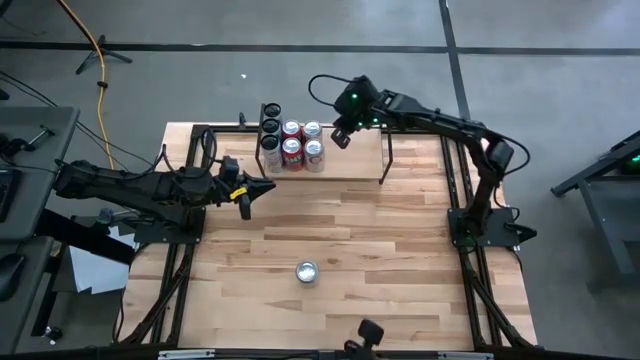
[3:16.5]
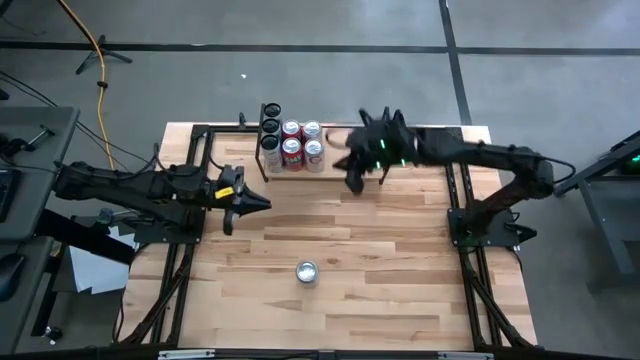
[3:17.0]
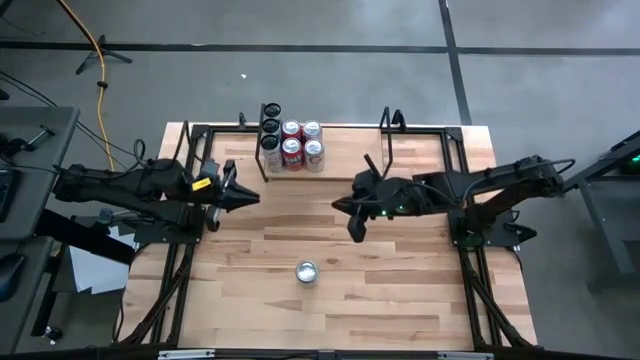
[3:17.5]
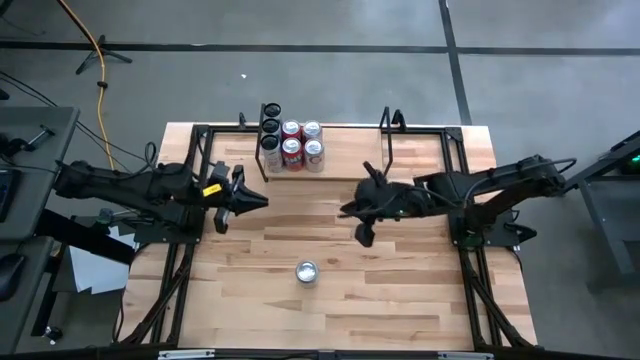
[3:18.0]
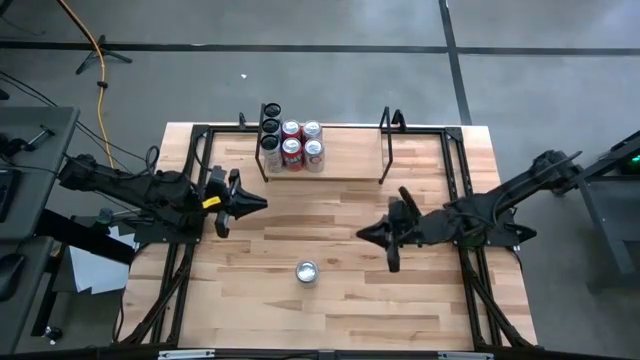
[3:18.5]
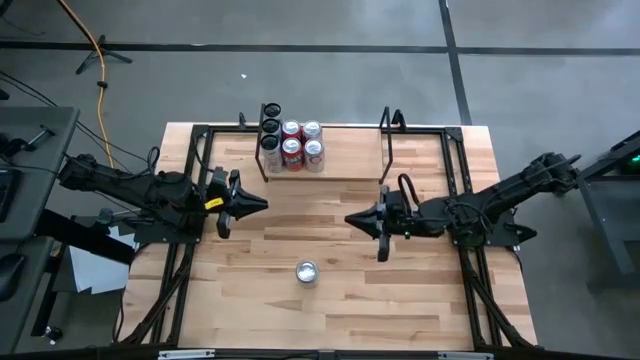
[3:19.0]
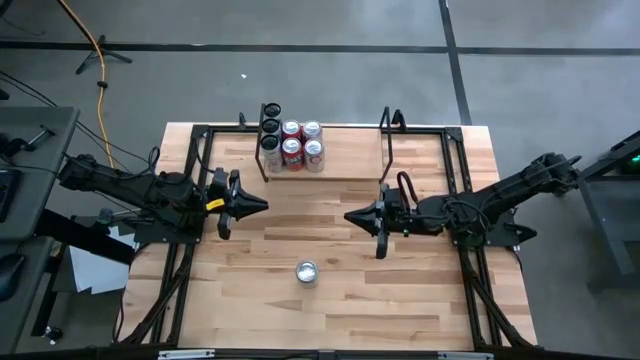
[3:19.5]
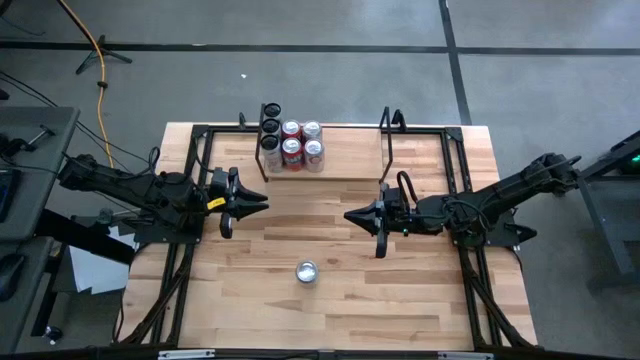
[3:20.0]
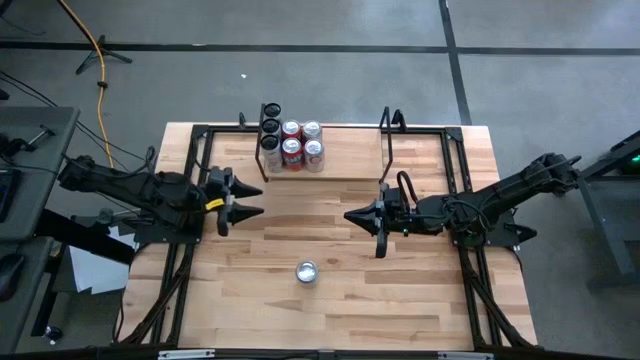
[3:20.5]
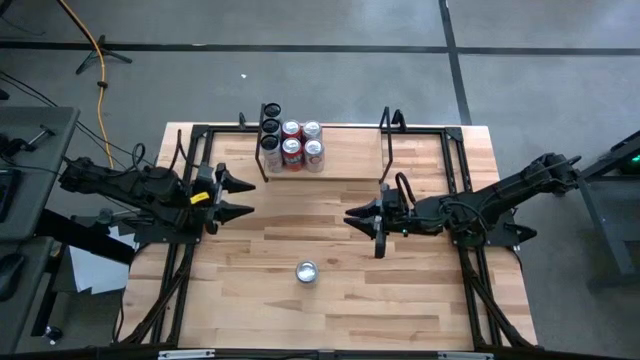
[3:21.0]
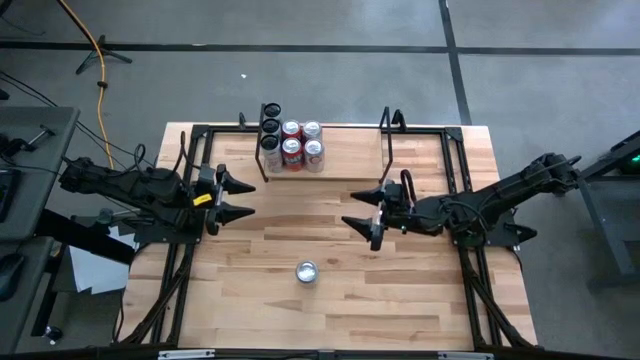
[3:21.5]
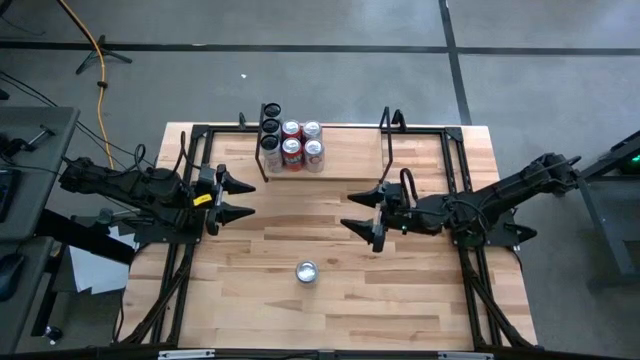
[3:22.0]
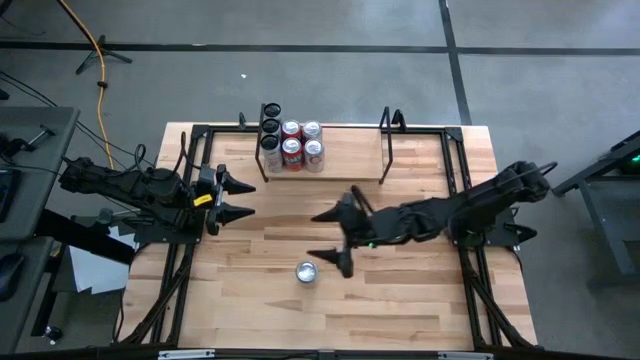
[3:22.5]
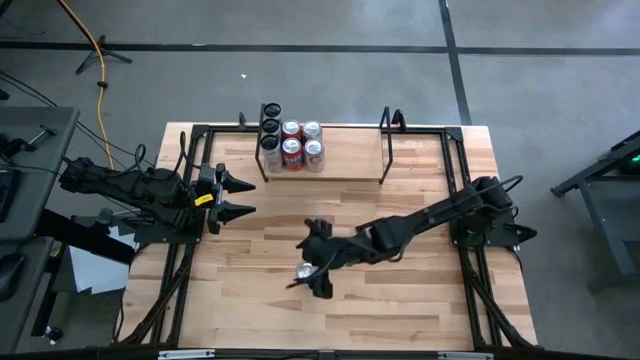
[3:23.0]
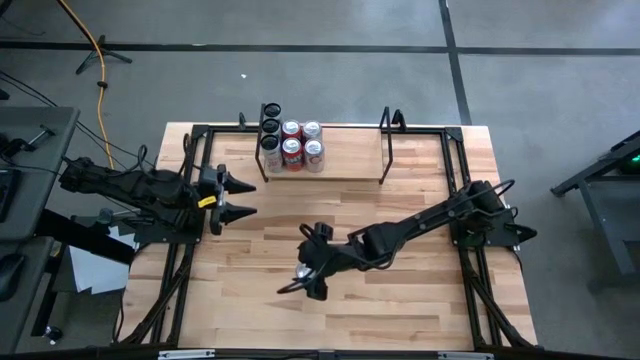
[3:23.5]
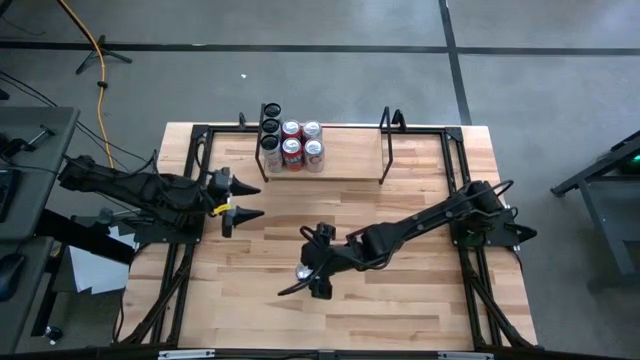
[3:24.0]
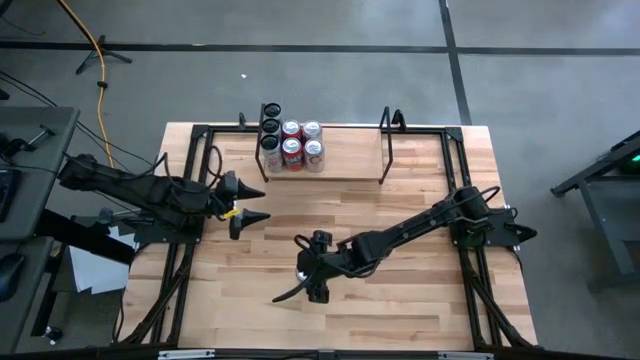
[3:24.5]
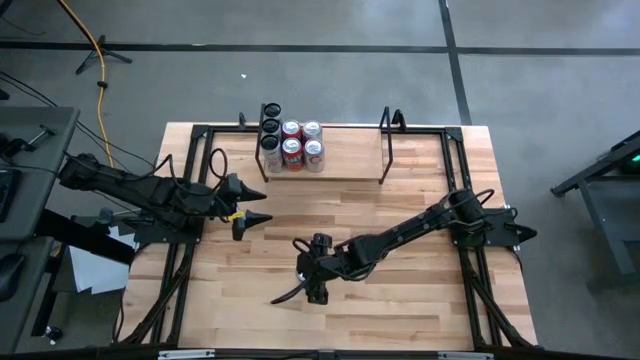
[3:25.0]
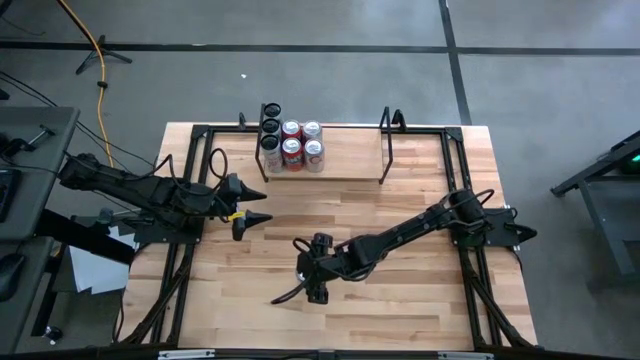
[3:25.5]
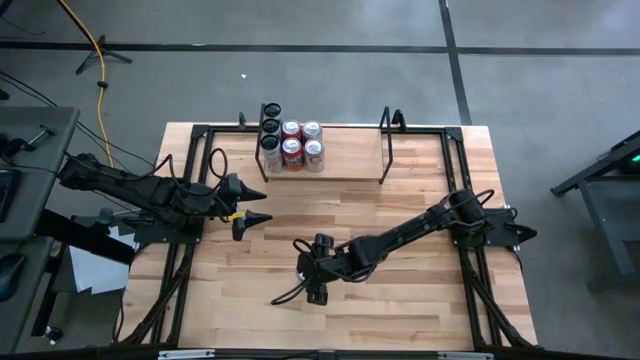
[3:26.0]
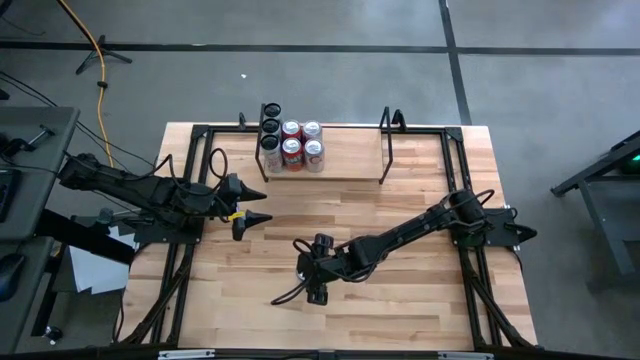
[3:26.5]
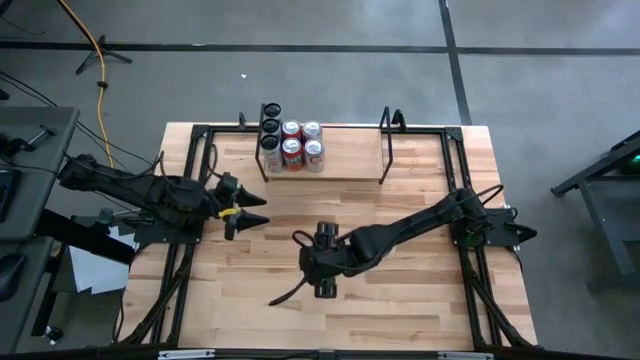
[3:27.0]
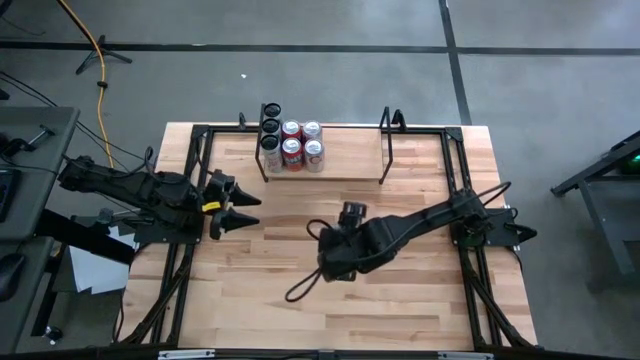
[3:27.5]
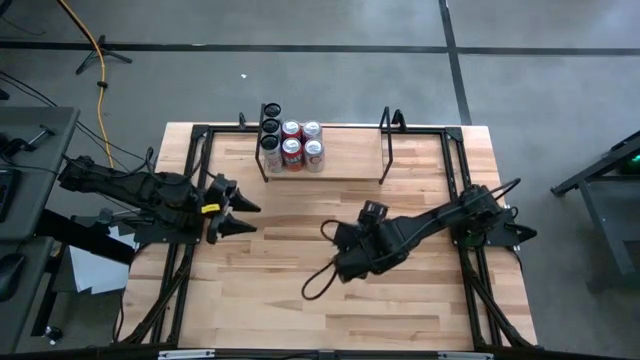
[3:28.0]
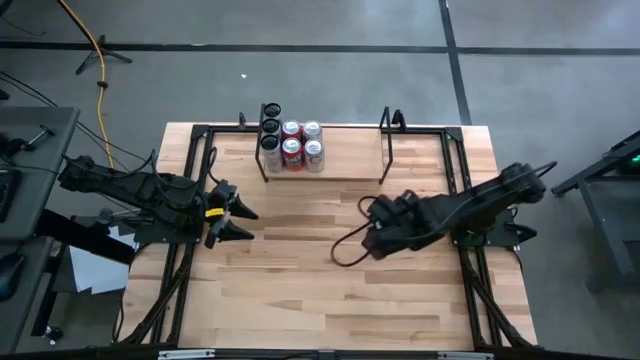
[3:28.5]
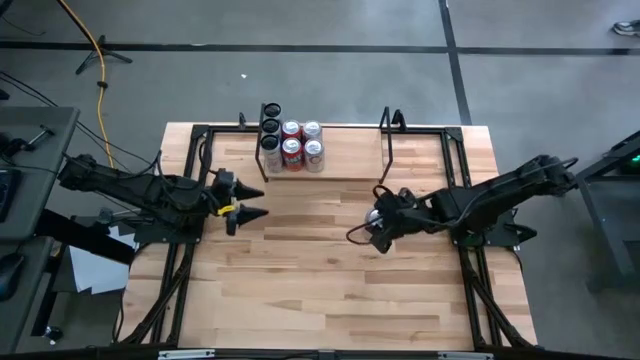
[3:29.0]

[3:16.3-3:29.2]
Task: Place canned beverage on shelf
Put the silver soda can aligned with the other silver soda can on the shelf

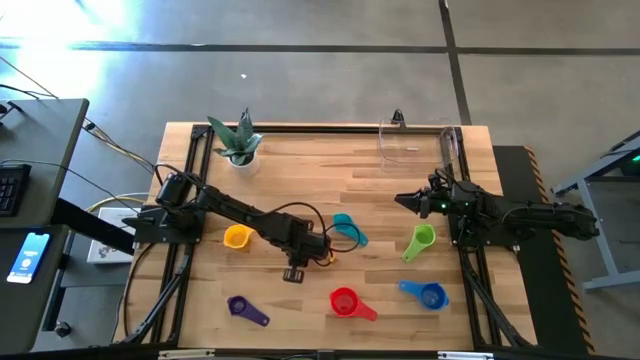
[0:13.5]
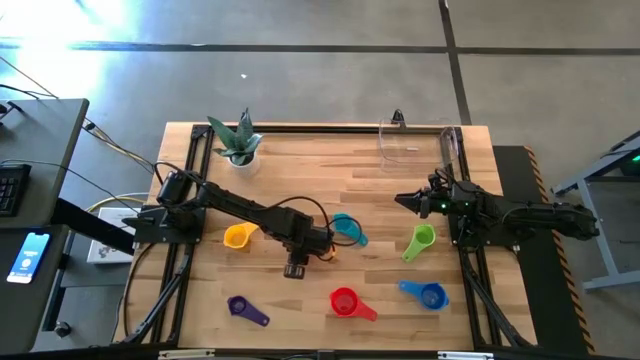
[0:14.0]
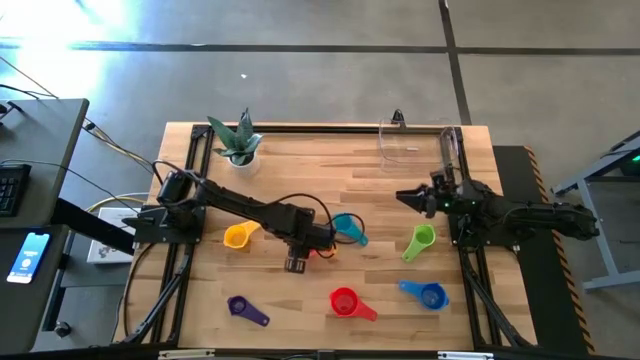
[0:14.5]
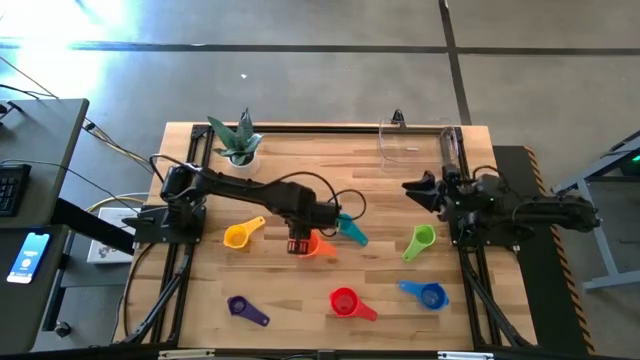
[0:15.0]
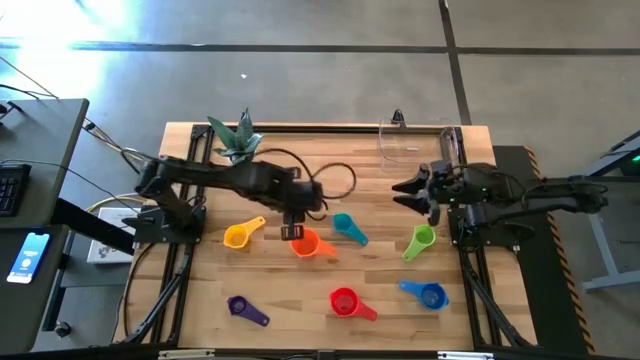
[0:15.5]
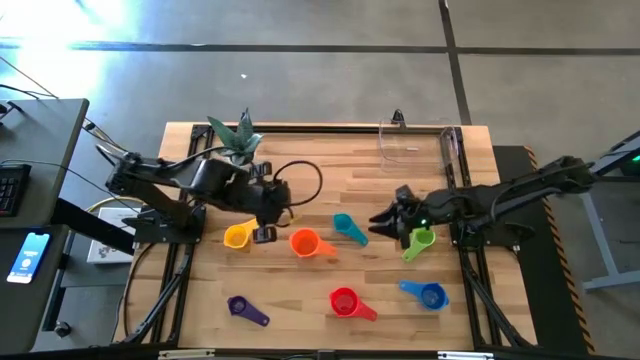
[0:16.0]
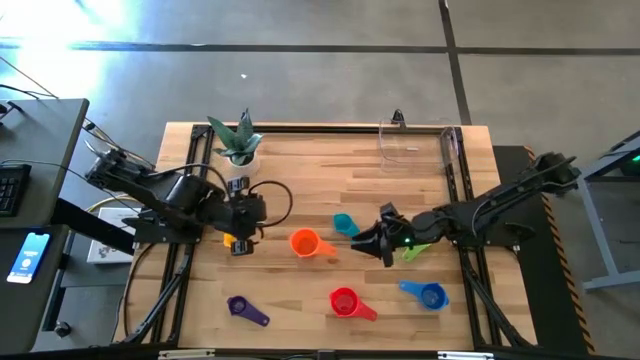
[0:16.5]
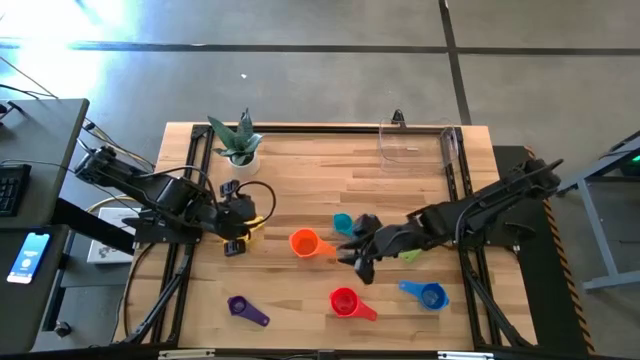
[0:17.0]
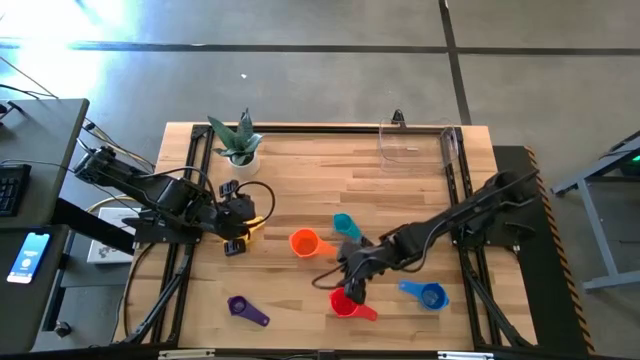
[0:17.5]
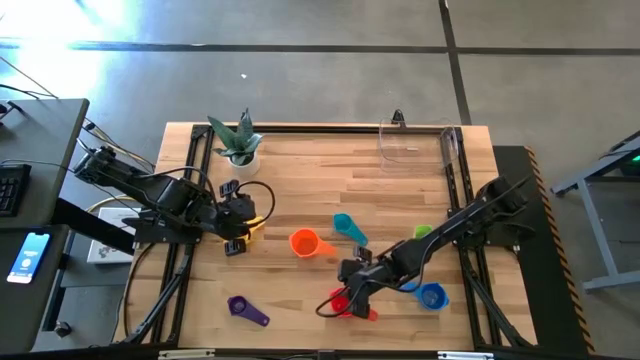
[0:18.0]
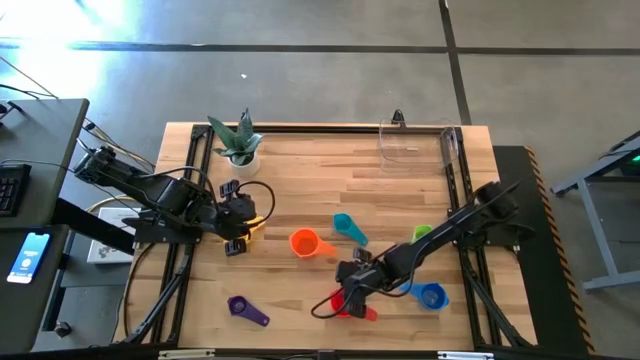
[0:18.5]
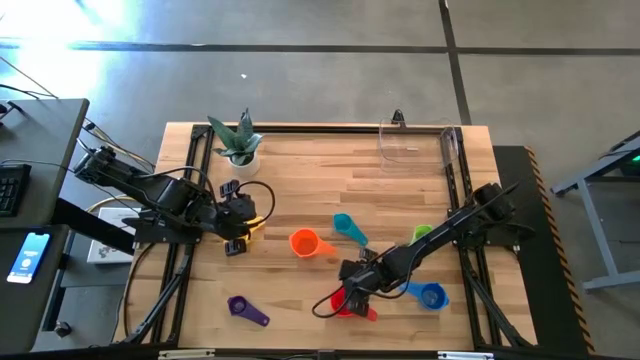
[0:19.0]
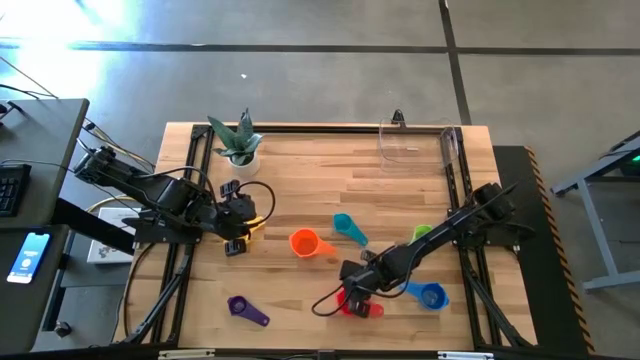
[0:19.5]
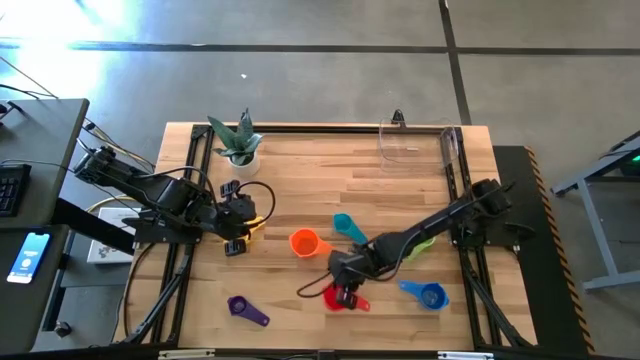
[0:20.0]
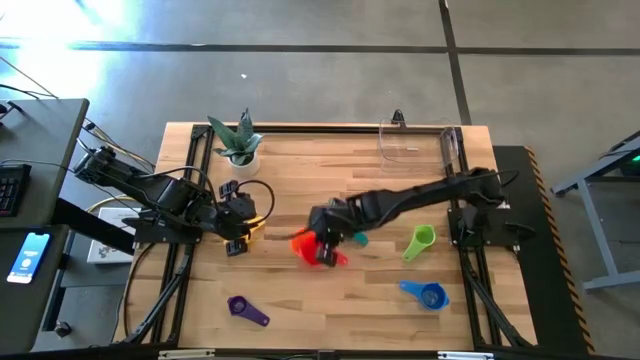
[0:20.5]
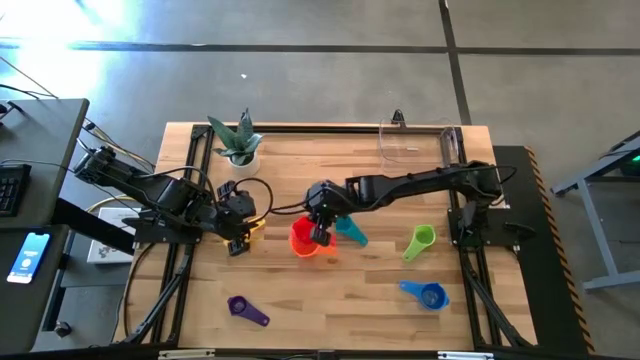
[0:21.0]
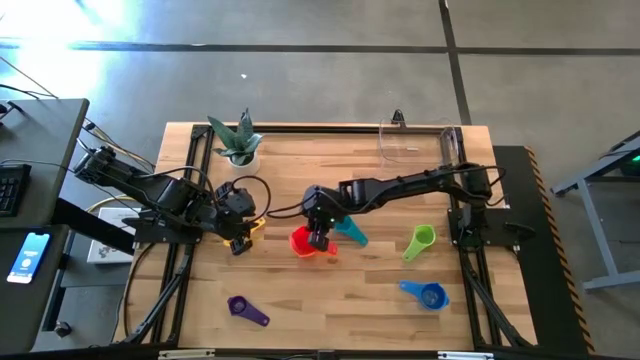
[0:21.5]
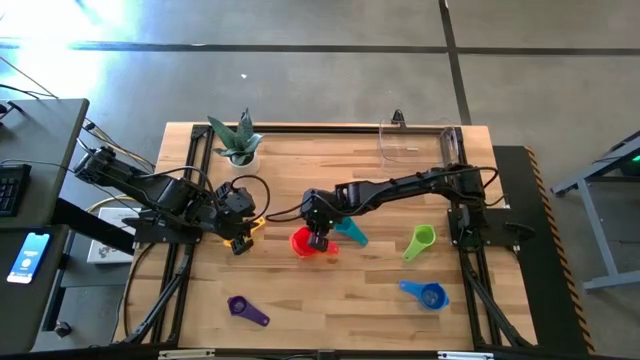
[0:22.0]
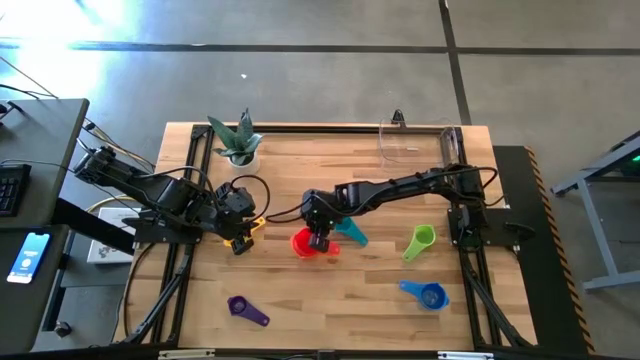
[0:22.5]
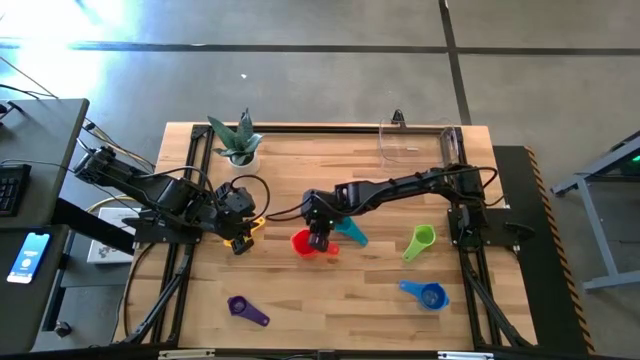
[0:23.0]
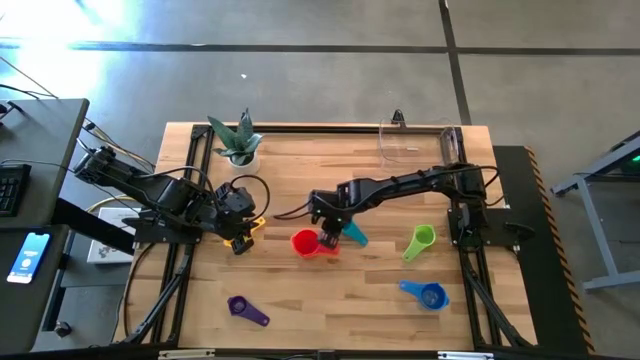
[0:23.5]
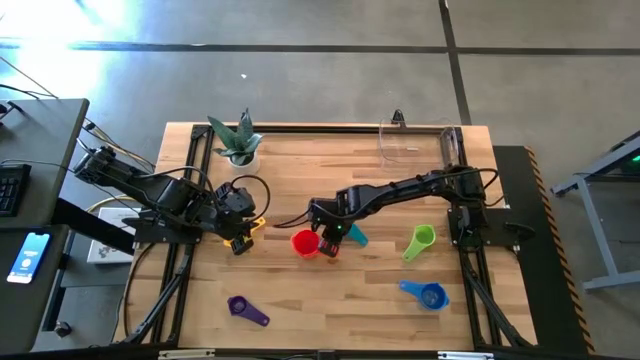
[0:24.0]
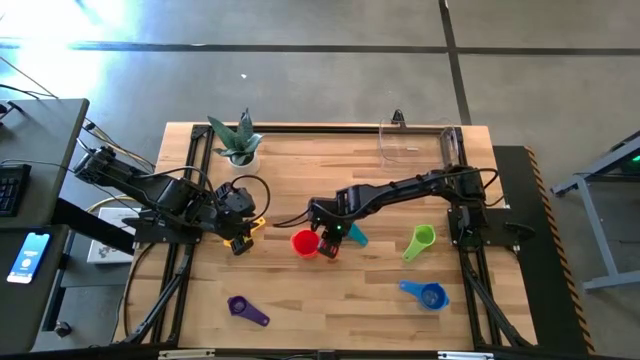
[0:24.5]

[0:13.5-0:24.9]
Task: Nest measuring cups in basket
Stack the red measuring cup on top of the orange measuring cup
